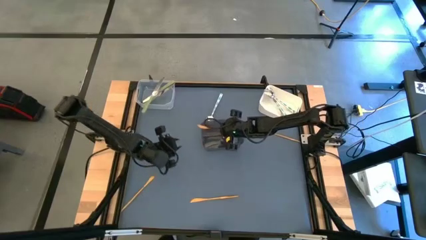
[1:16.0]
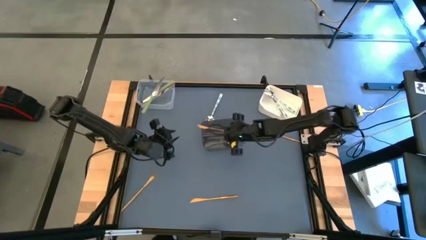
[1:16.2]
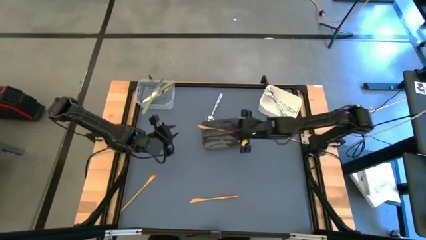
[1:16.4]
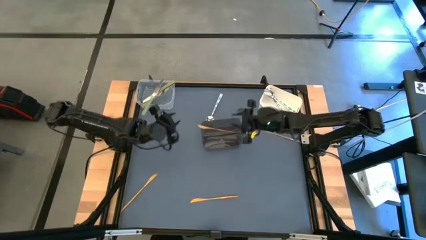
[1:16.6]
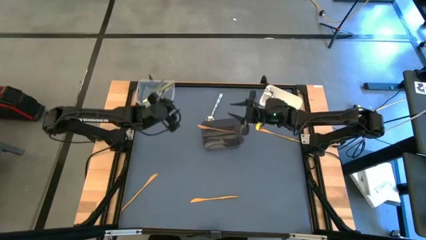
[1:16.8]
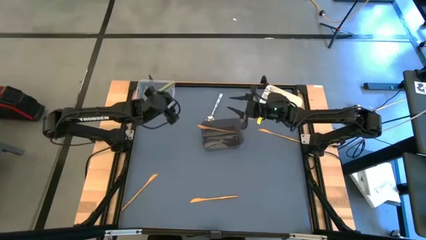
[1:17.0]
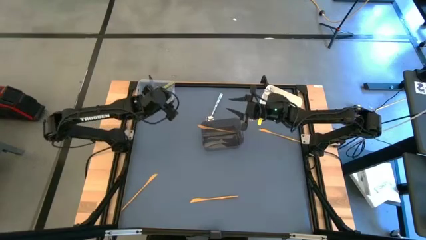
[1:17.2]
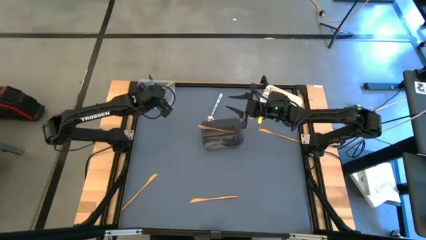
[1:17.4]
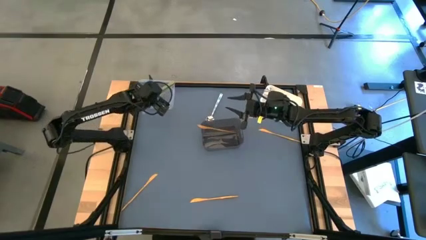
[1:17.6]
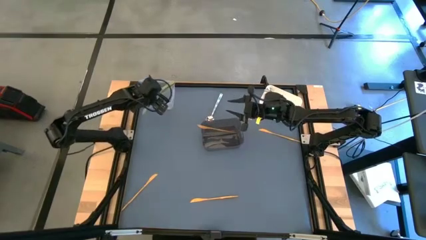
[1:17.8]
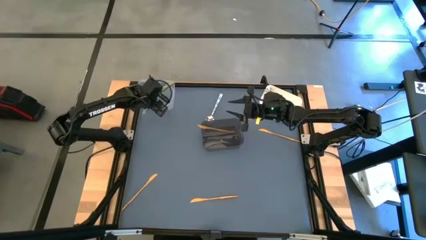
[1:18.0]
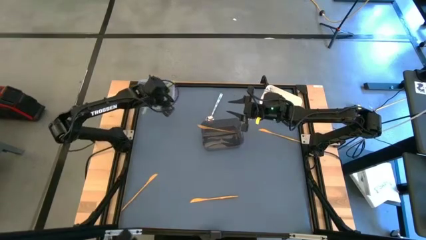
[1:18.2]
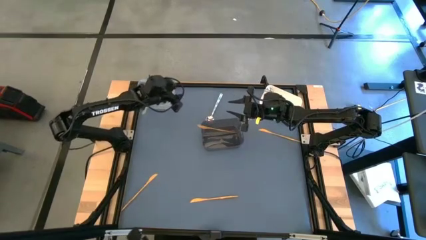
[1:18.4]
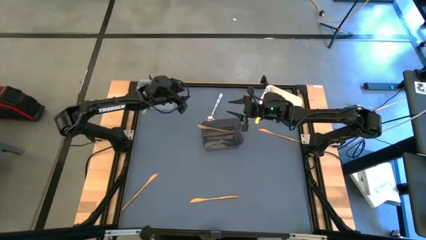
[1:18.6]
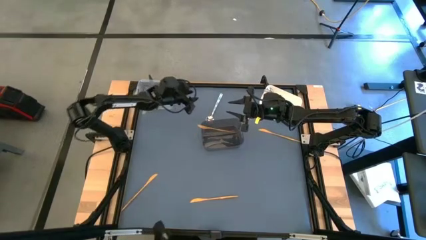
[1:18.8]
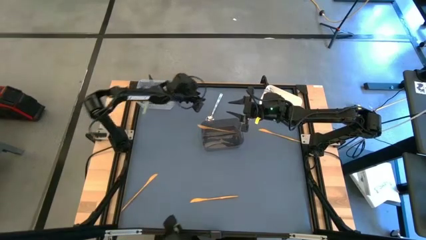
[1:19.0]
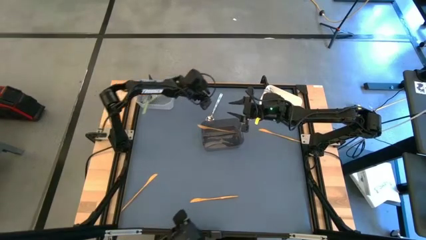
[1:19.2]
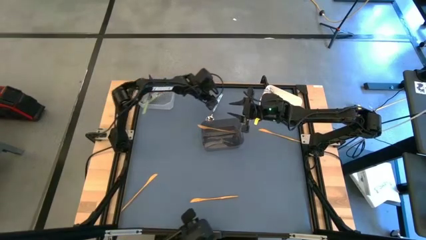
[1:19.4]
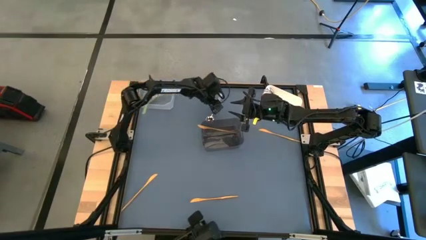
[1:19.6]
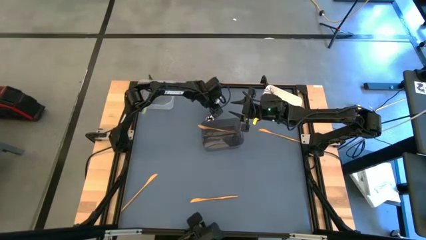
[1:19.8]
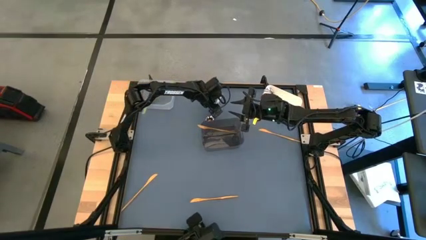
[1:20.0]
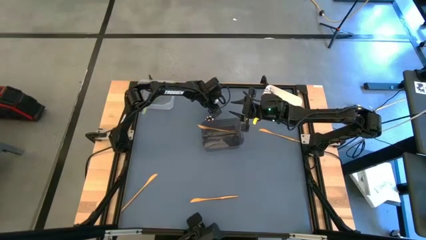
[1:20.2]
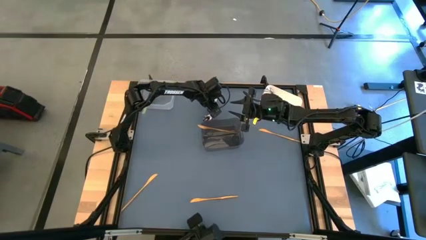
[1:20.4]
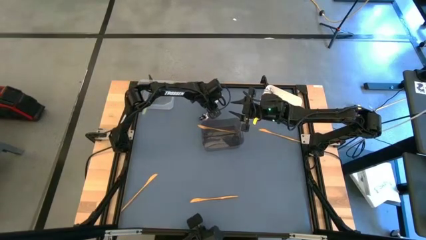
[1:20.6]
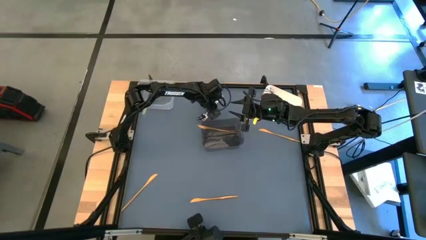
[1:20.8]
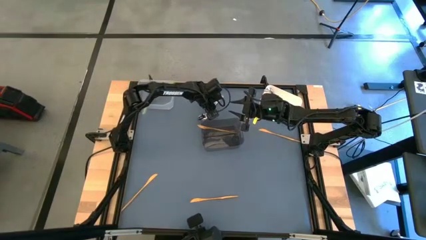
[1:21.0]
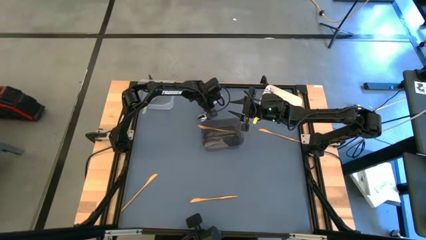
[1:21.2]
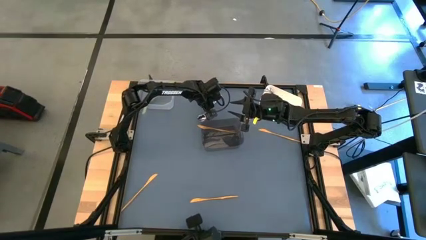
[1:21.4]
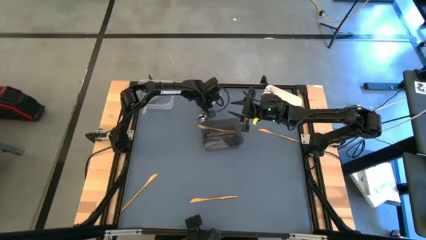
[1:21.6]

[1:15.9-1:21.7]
Task: Sort silverware by color (type)
Put the green spoon into the white bin

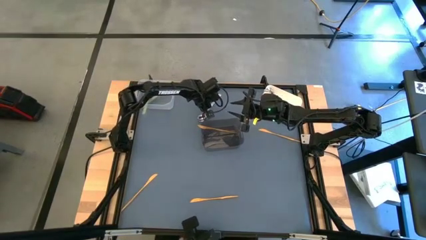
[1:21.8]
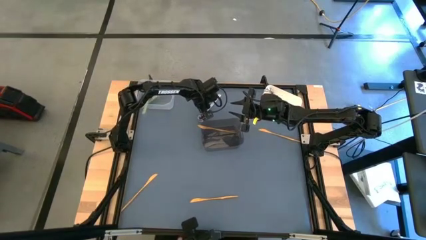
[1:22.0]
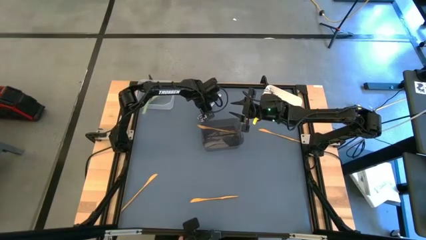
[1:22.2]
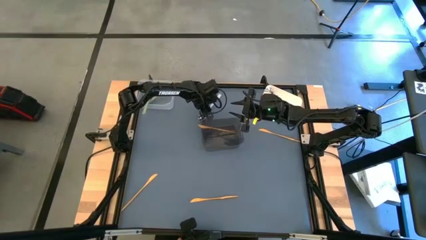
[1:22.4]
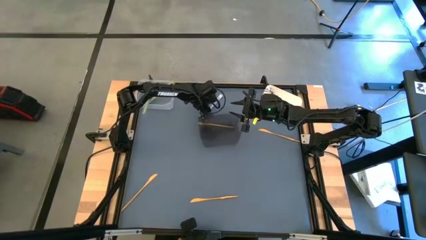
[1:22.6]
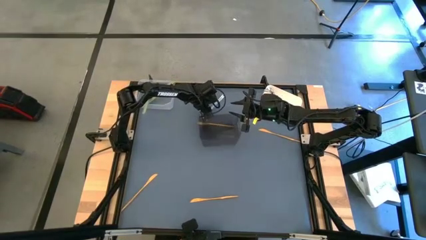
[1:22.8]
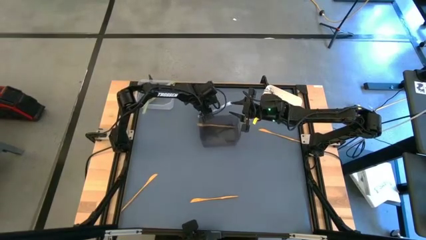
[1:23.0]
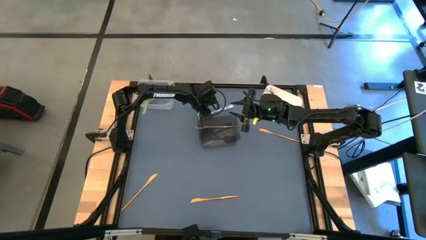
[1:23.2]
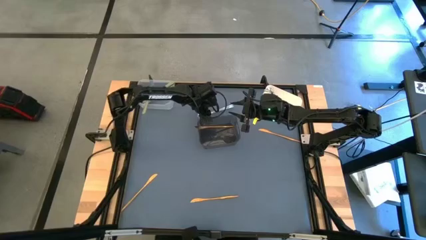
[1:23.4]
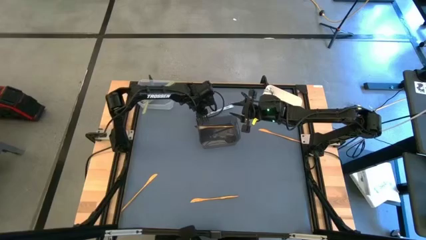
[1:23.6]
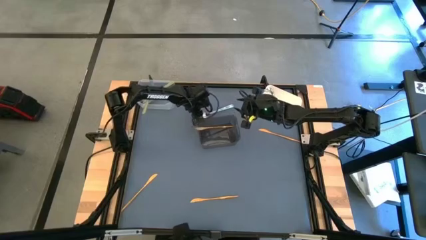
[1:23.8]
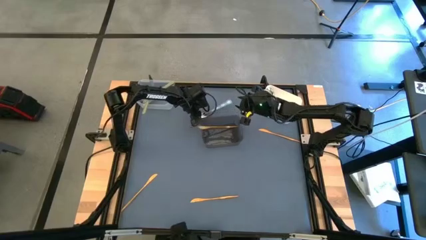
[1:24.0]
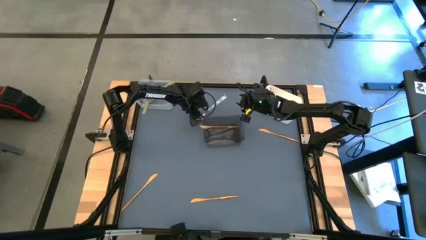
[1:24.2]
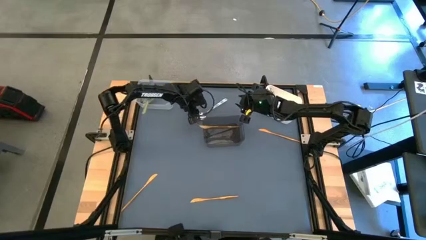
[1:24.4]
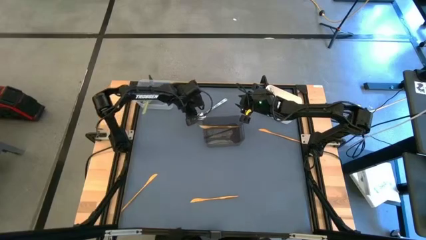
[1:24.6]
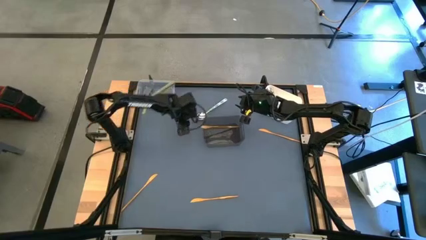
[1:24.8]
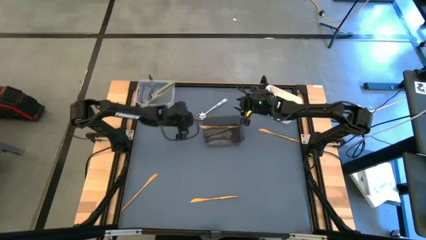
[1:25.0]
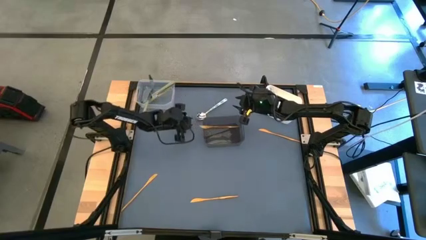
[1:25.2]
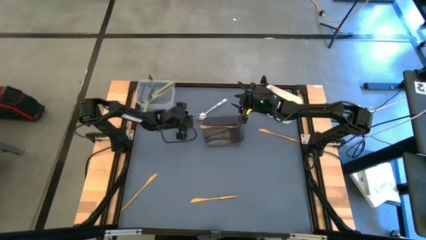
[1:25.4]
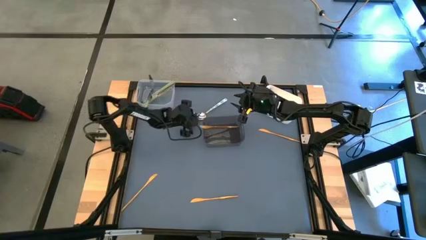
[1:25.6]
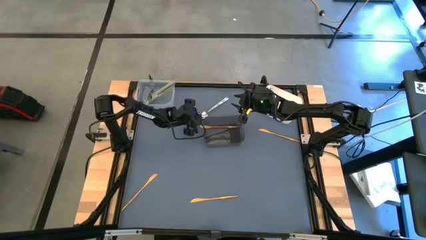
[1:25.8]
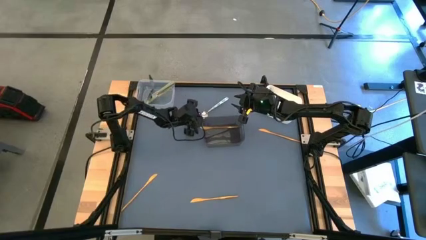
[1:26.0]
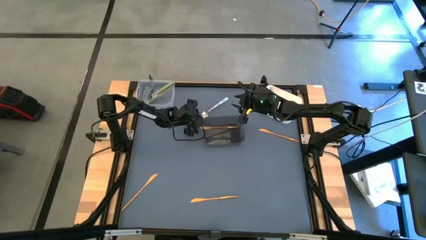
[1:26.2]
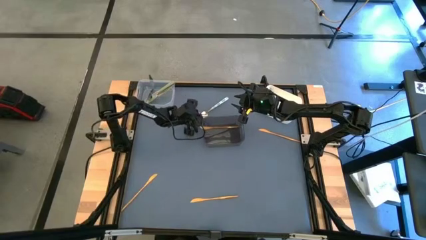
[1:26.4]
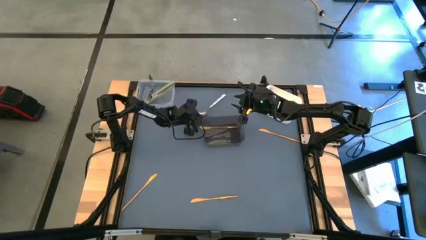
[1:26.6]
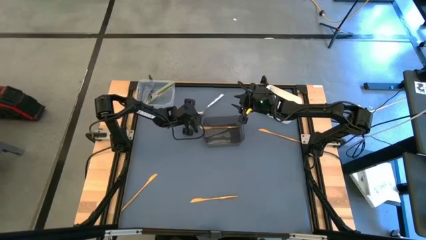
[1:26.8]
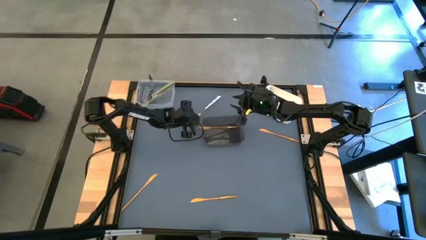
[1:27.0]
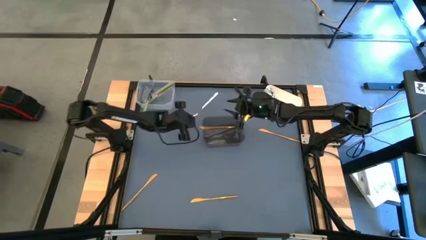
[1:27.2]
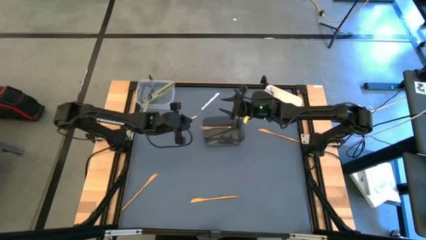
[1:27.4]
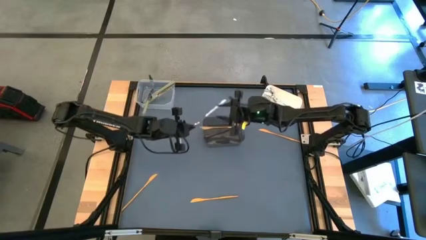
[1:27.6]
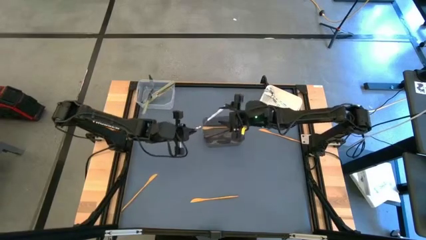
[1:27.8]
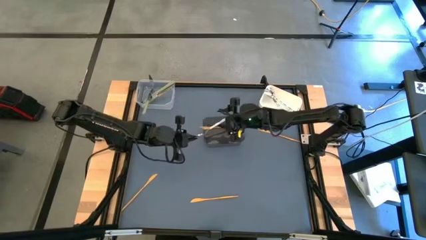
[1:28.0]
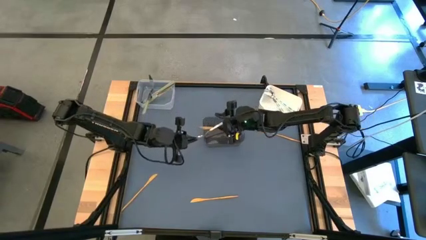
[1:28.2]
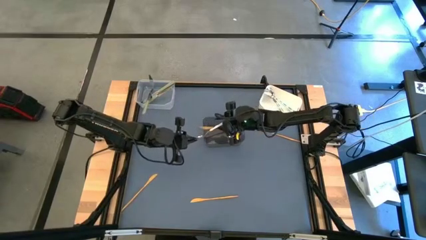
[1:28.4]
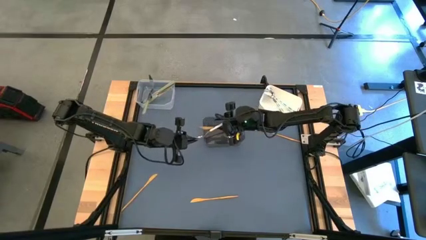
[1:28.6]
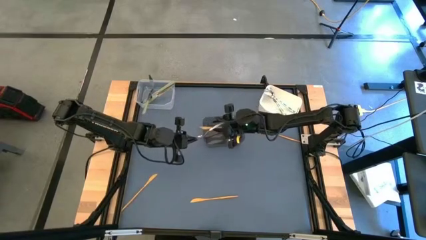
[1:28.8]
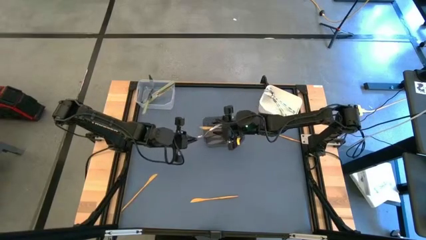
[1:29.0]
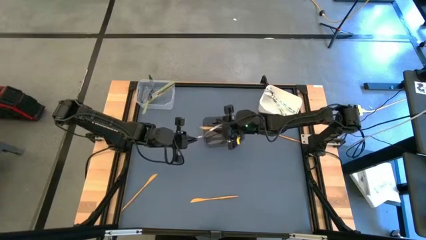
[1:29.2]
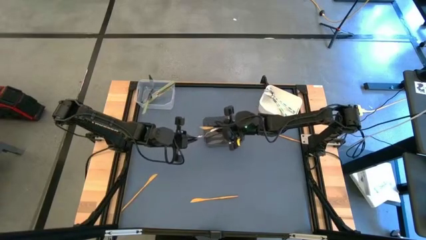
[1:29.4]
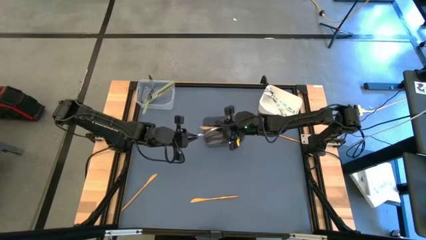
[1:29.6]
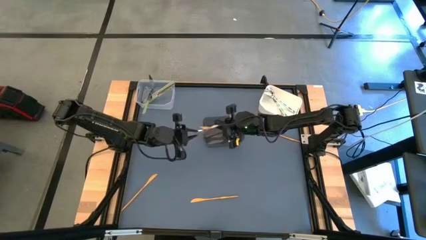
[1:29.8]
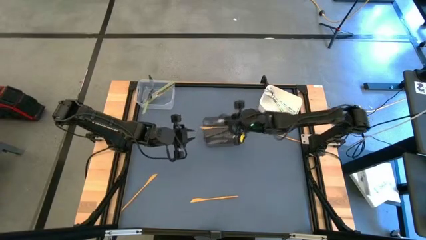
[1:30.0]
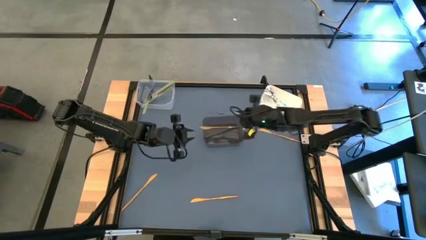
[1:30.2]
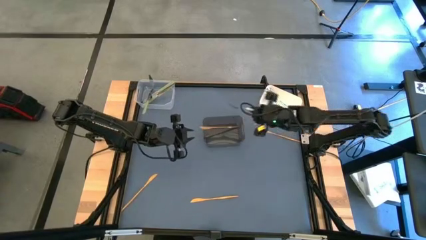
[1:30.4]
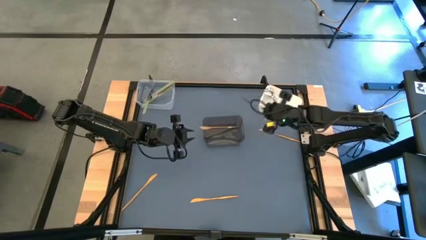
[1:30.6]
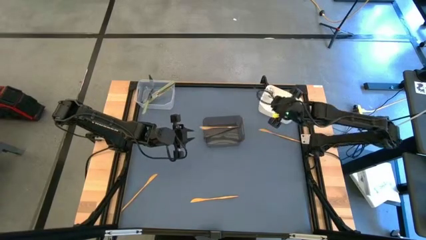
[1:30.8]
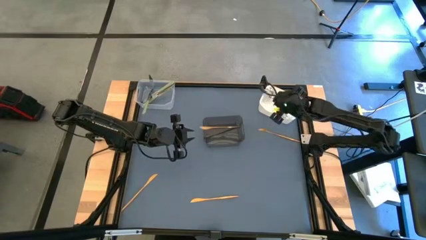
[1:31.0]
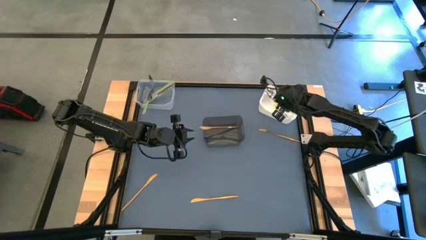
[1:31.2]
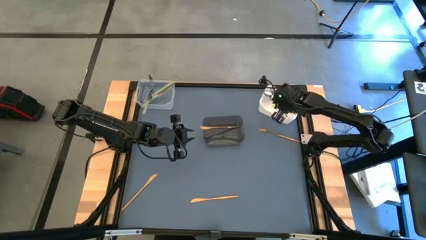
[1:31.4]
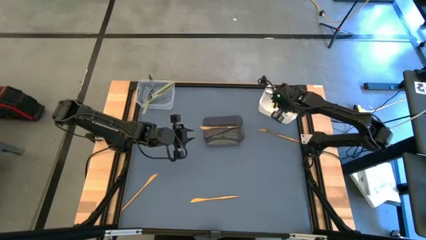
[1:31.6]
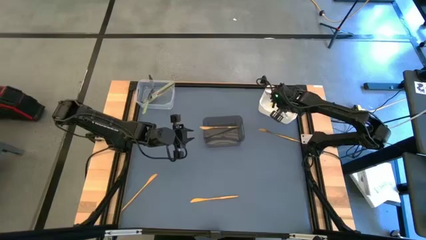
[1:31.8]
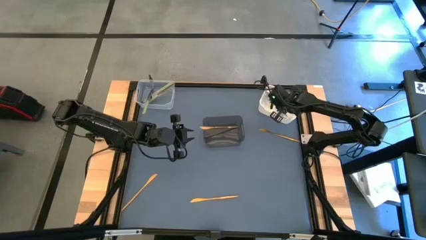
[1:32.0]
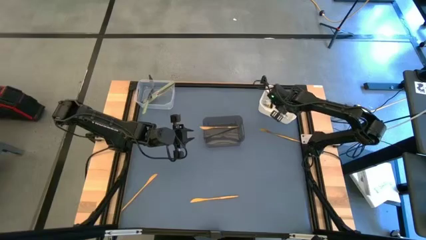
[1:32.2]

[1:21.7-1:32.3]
Put the green spoon into the white bin
